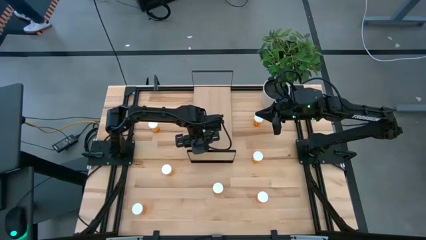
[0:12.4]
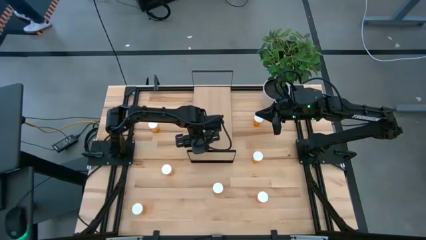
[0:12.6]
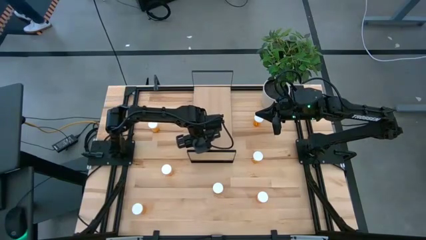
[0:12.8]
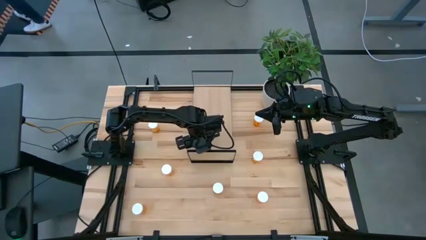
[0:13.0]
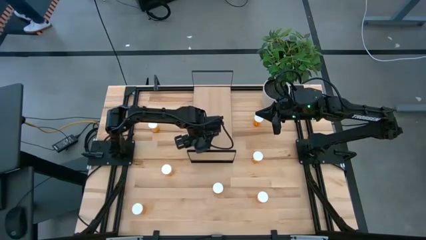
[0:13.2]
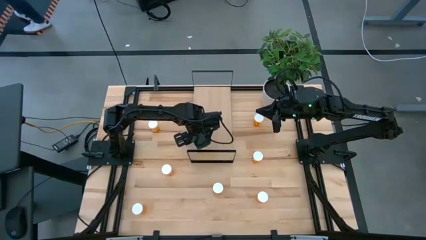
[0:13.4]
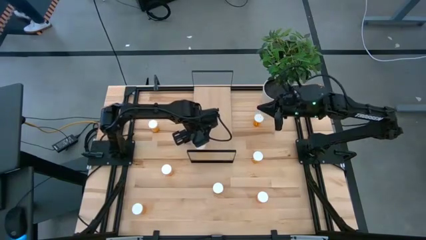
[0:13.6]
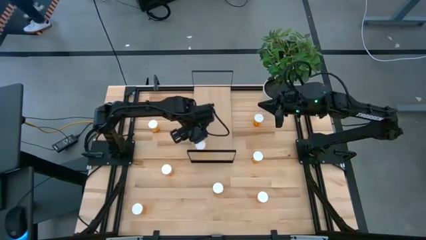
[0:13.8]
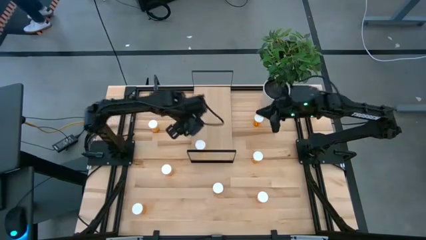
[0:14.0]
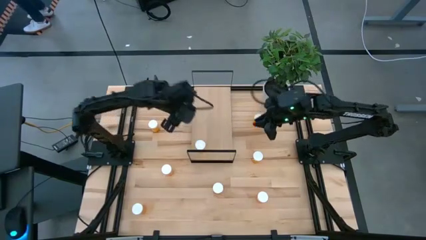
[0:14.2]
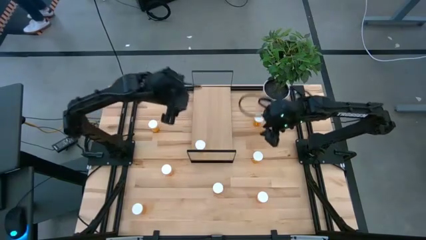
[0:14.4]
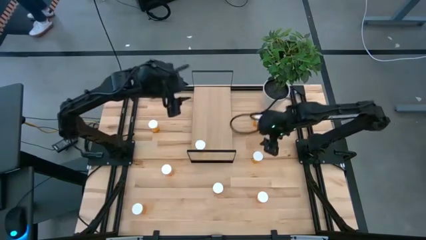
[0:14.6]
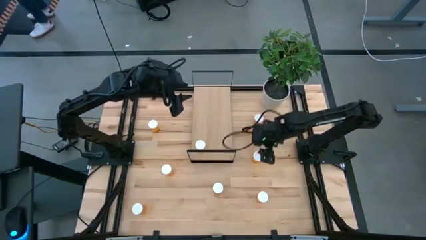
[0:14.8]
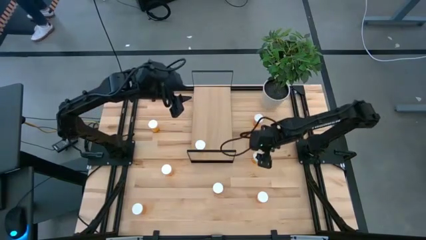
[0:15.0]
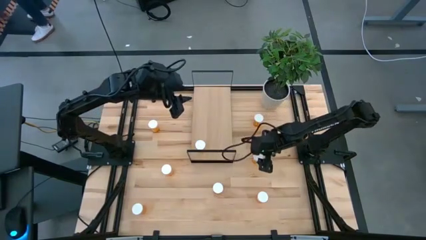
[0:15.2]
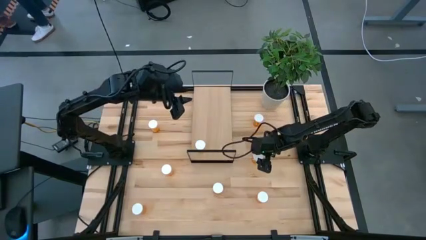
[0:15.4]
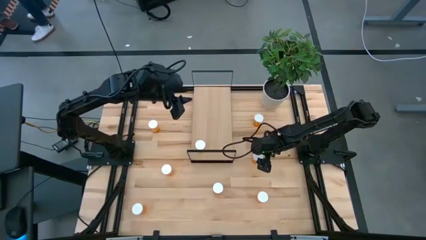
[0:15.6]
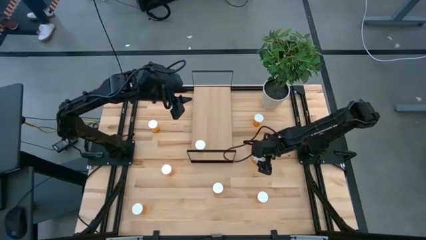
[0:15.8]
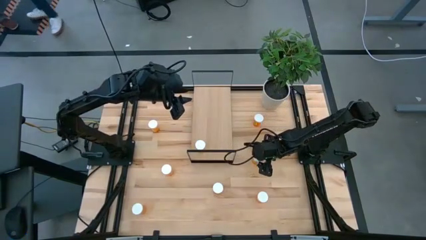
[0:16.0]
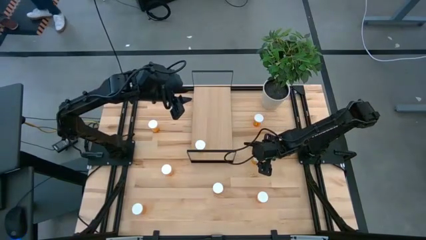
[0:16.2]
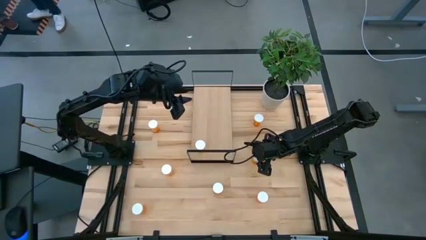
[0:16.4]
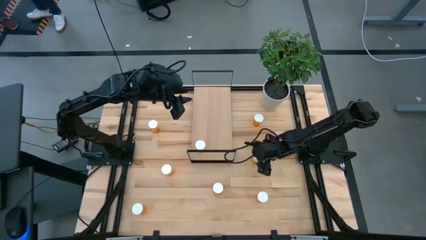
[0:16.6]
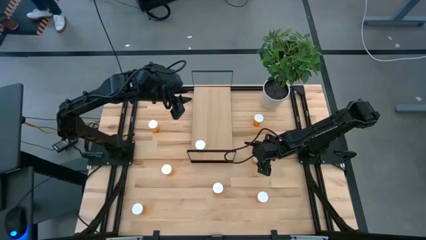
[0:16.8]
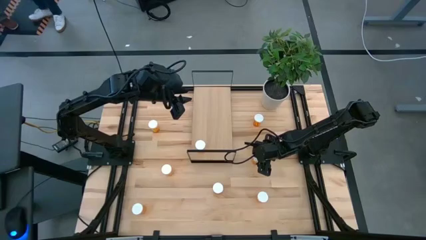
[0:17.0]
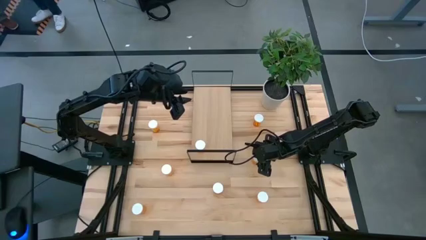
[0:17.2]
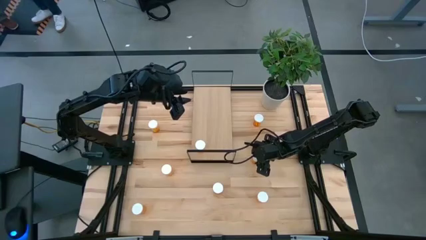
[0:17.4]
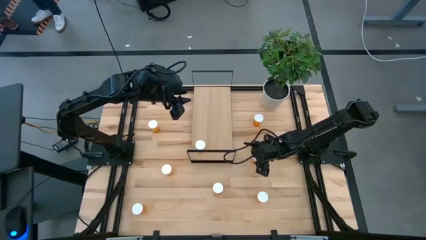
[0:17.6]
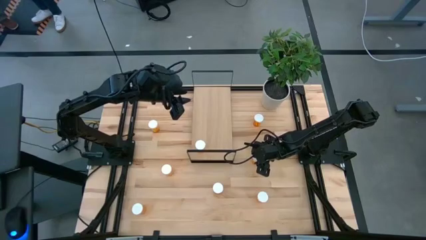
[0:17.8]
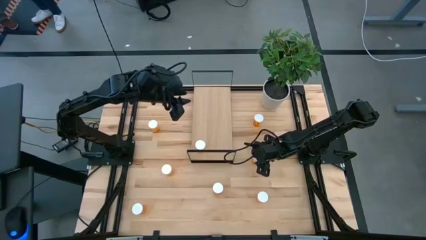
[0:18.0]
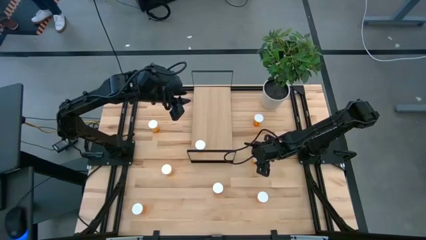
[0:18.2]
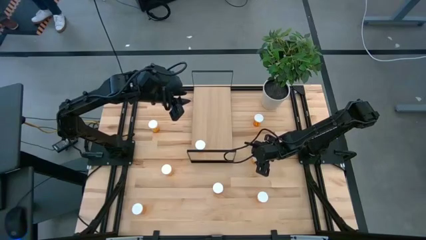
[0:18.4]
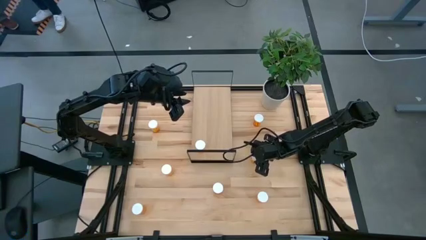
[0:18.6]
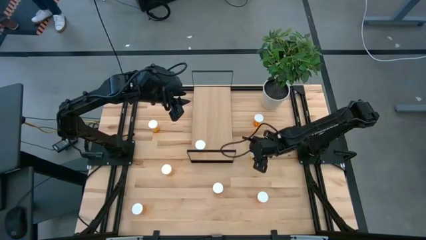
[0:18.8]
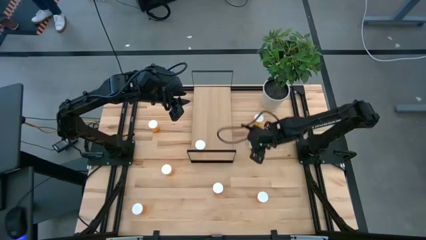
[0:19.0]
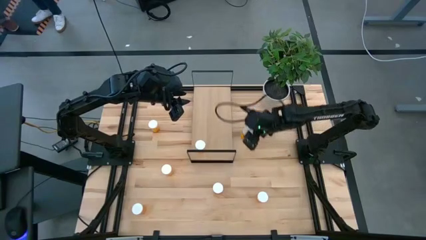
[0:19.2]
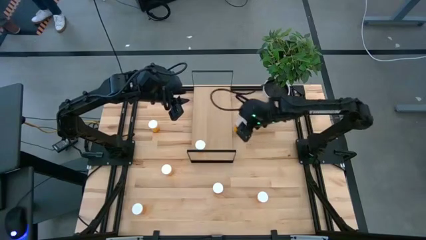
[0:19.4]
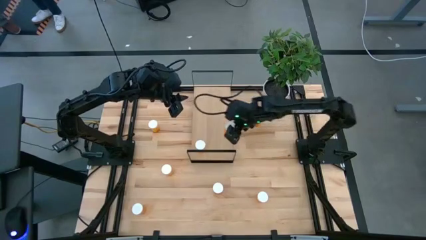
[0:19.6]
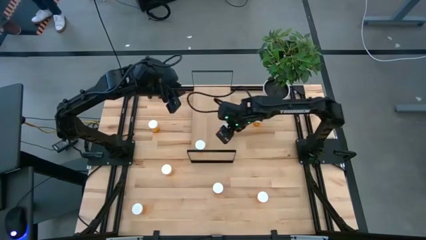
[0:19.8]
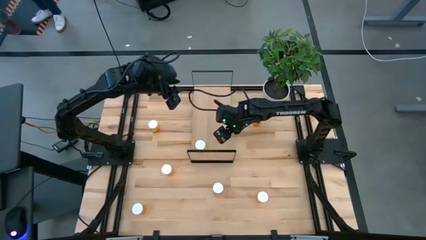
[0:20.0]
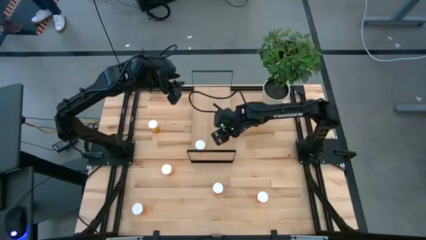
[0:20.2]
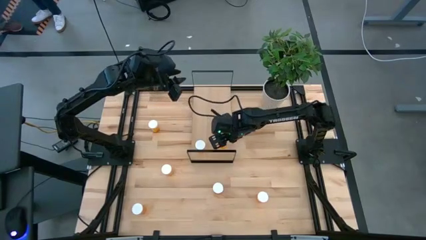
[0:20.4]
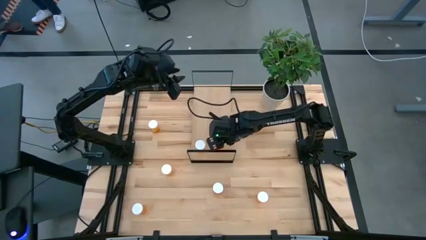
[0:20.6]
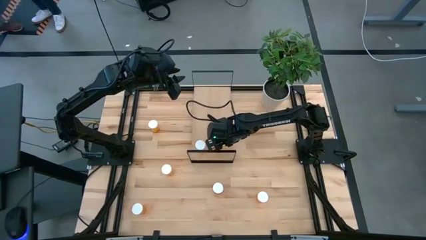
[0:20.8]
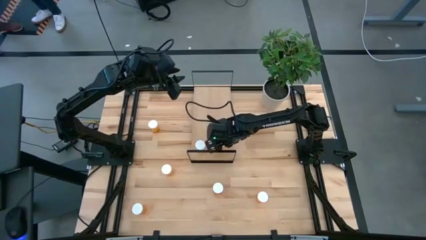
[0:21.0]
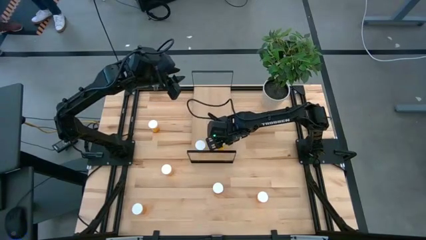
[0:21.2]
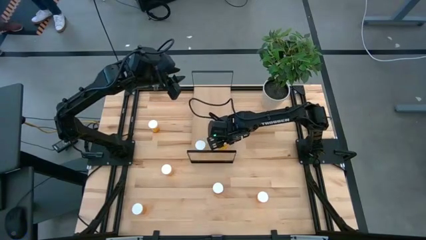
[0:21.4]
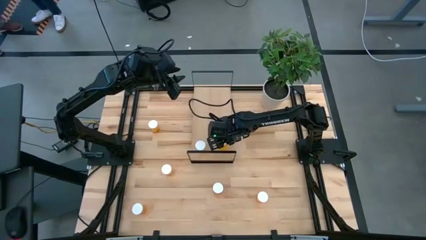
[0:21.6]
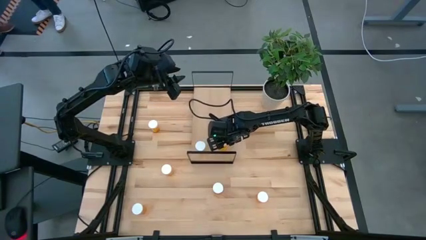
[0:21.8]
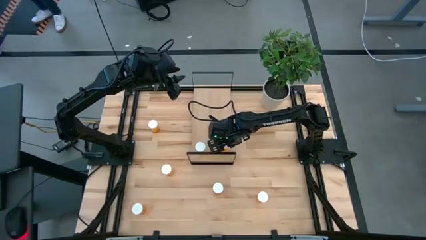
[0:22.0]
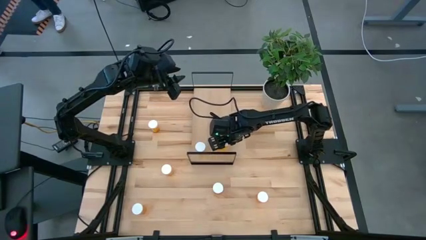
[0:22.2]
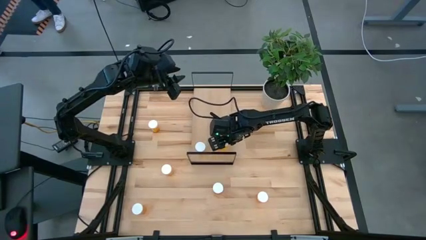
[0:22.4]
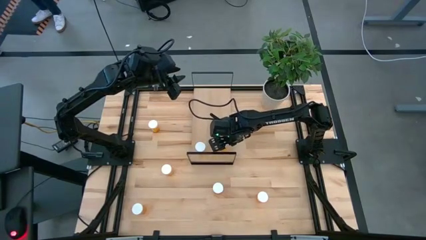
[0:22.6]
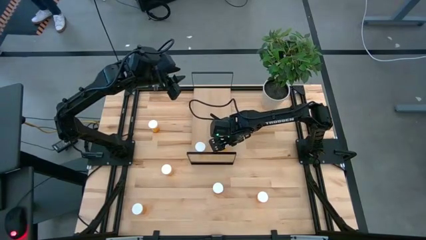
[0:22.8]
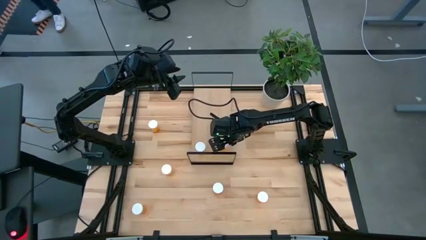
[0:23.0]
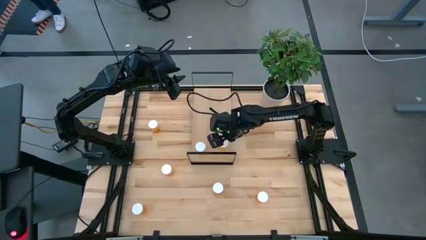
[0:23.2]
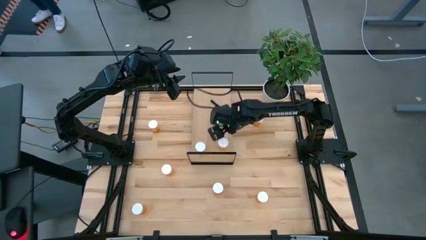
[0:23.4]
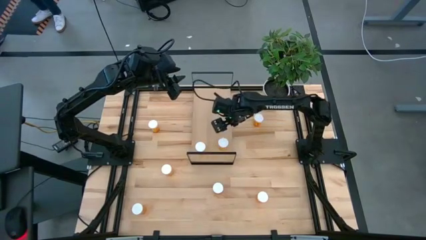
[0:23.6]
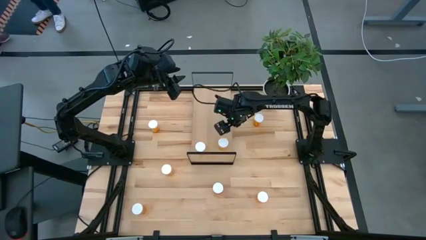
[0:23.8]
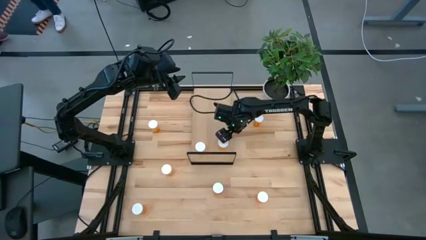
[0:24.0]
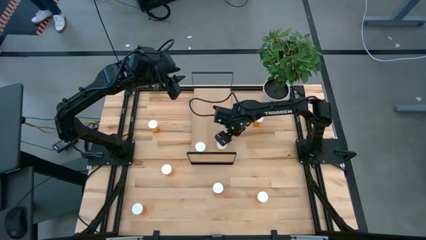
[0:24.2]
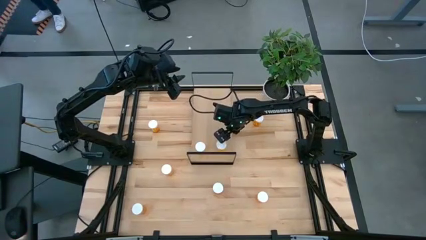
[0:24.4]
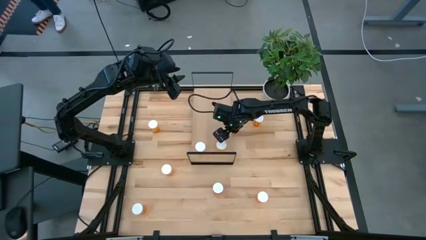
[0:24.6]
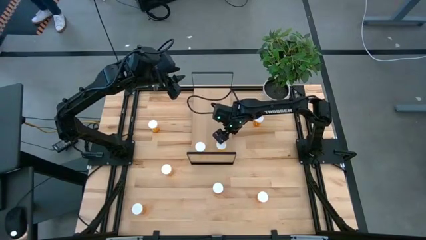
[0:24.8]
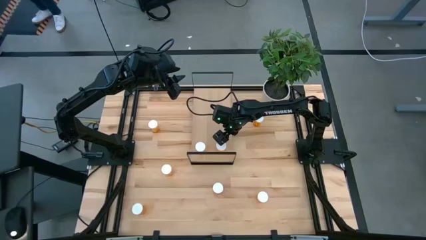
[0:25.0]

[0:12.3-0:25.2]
Task: Pick and place medicine bottles onto shelf by color
Put the orange pill bottle on the shelf aligned with the other orange pill bottle
